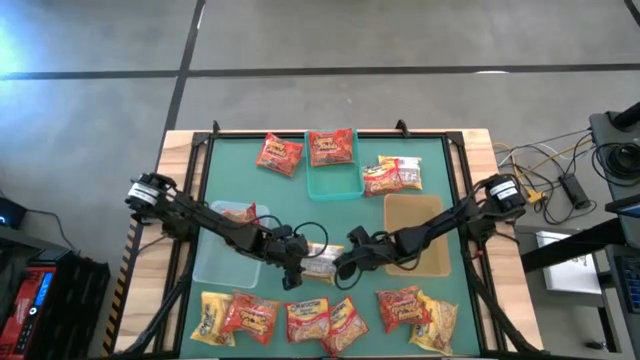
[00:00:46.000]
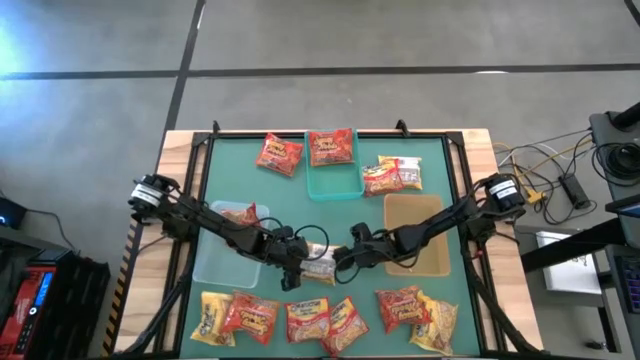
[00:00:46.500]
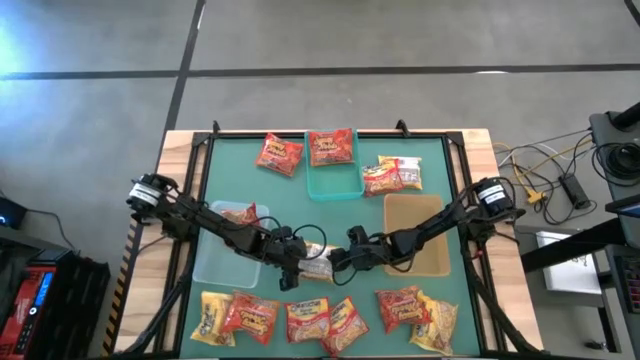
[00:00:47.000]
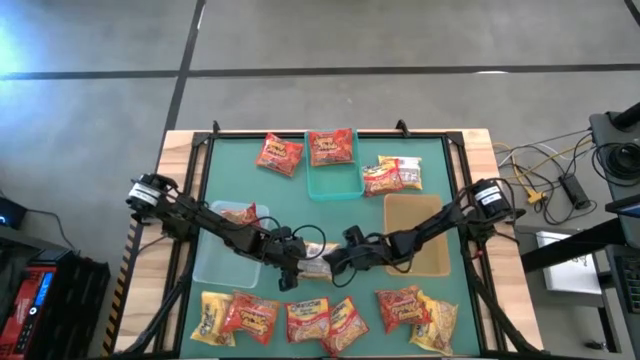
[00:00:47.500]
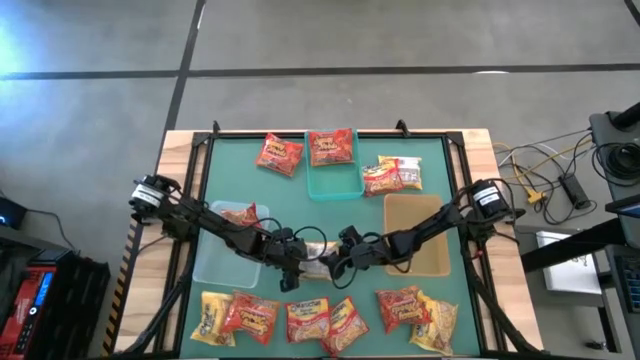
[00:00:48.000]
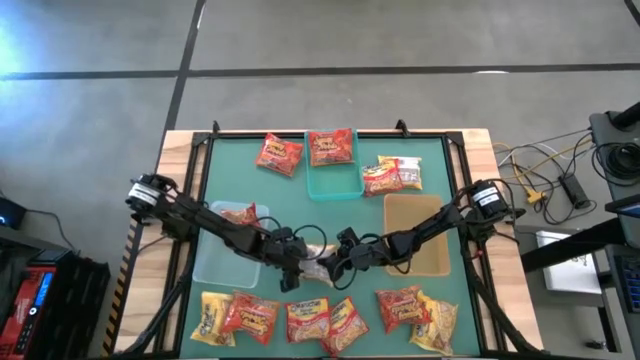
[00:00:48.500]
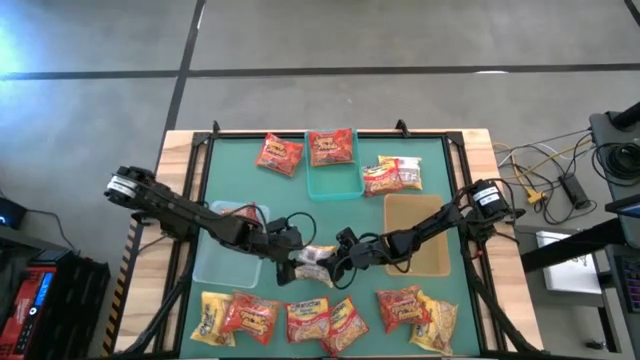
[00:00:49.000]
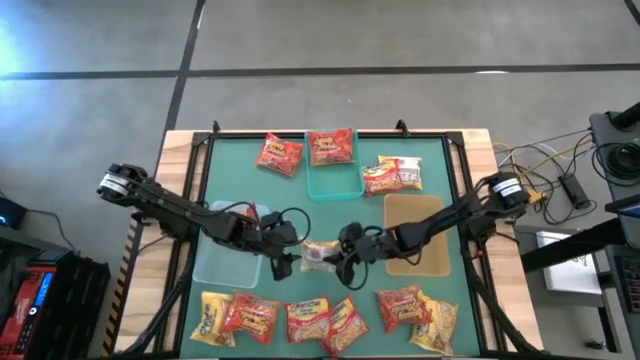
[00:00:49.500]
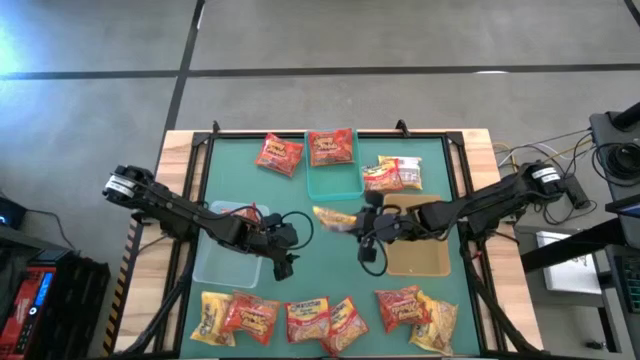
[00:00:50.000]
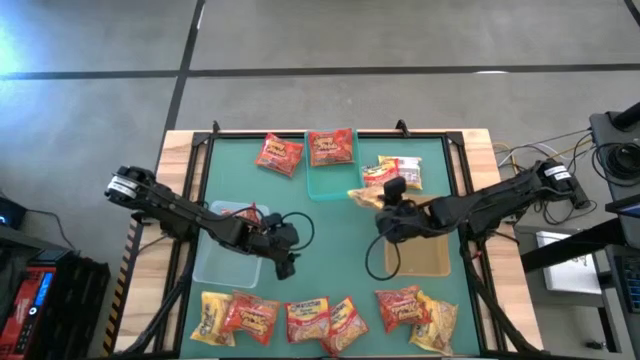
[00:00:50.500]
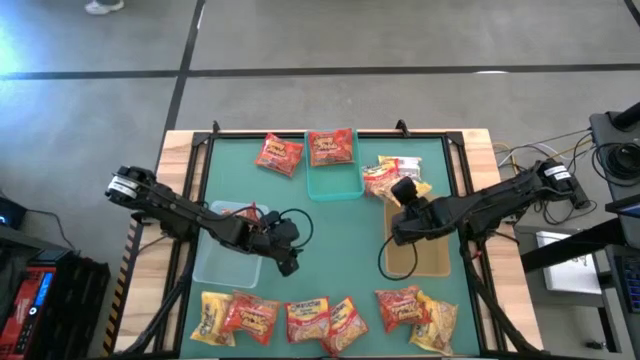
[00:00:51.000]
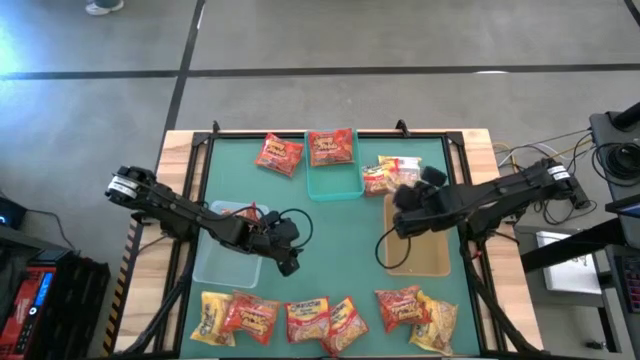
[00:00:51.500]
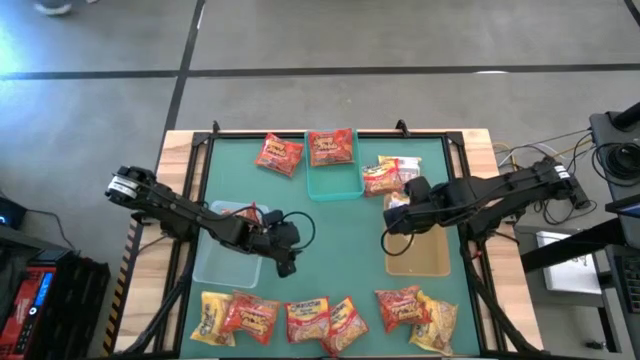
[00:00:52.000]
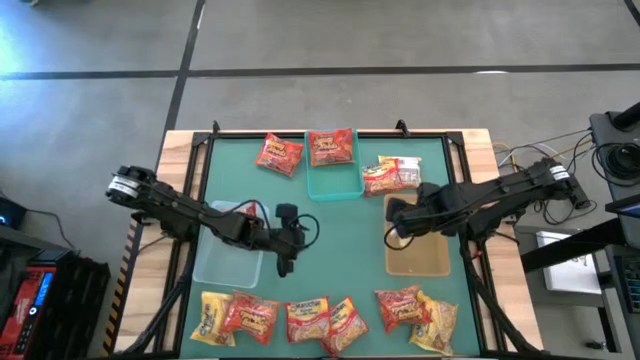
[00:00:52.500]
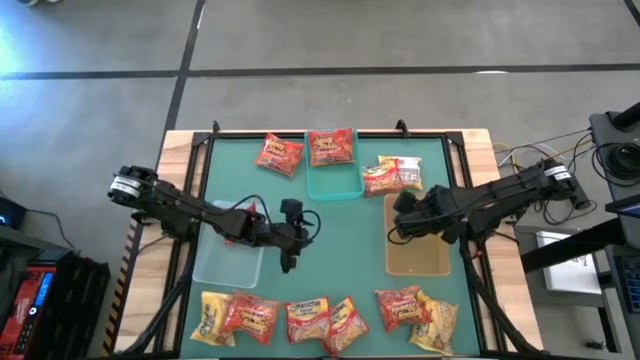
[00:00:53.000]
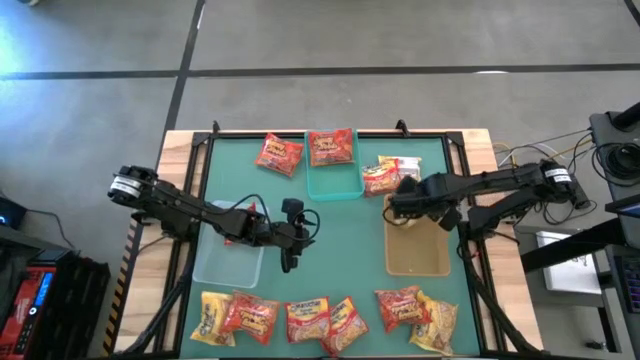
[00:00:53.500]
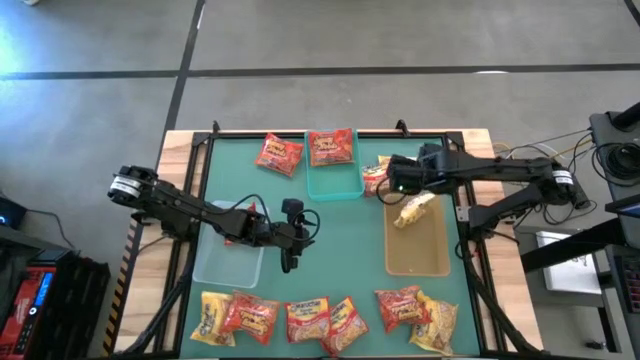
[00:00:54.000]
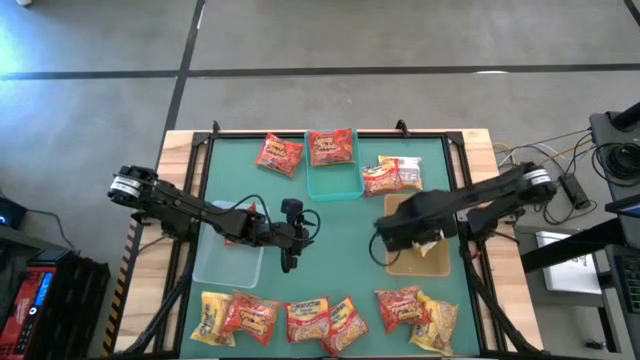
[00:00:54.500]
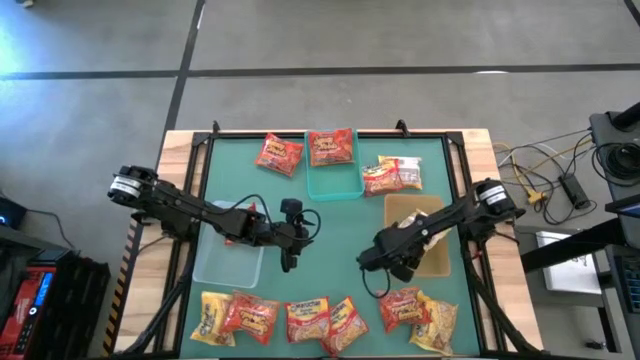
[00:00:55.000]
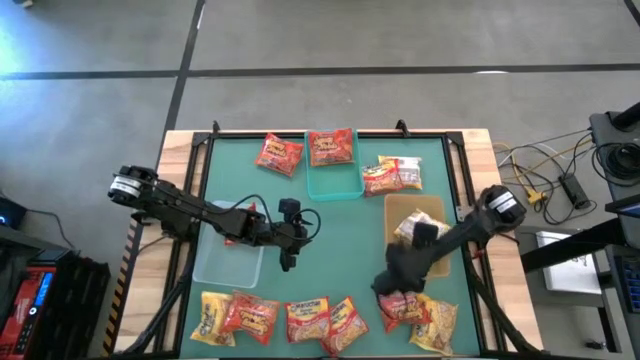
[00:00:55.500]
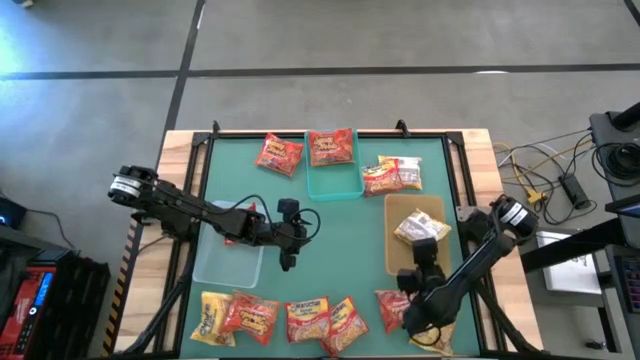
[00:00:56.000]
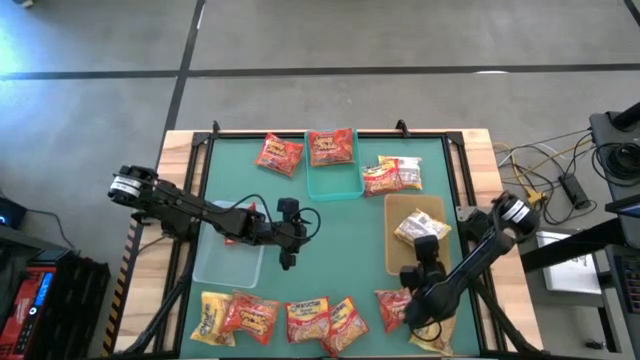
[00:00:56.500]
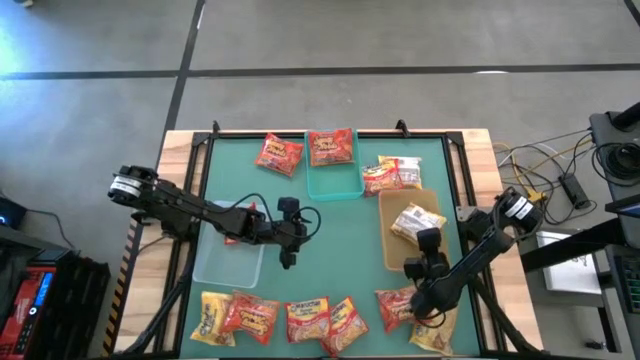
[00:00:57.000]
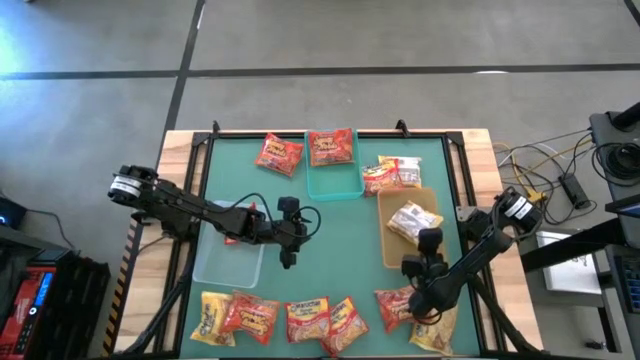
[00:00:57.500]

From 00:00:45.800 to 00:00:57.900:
Task: Sort Maruchan noodles
Put the yellow noodle pack into the yellow bin

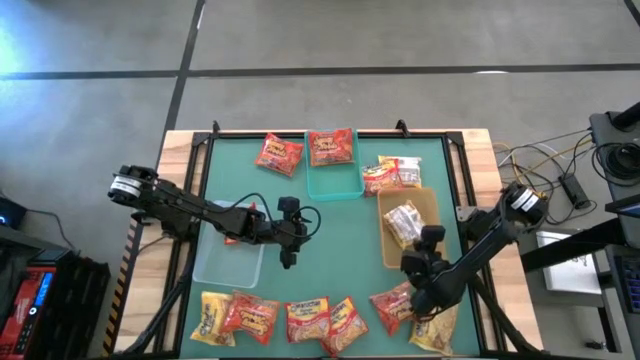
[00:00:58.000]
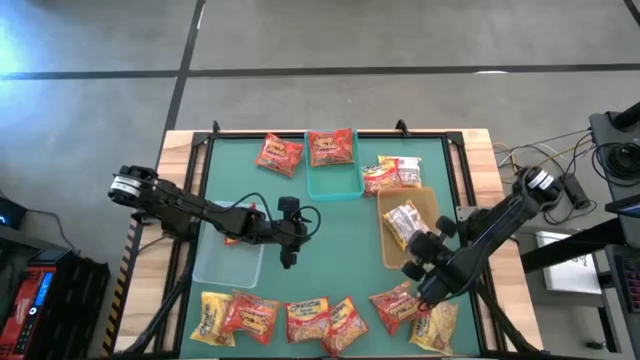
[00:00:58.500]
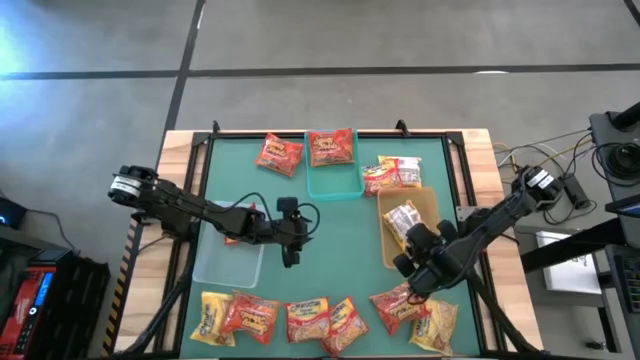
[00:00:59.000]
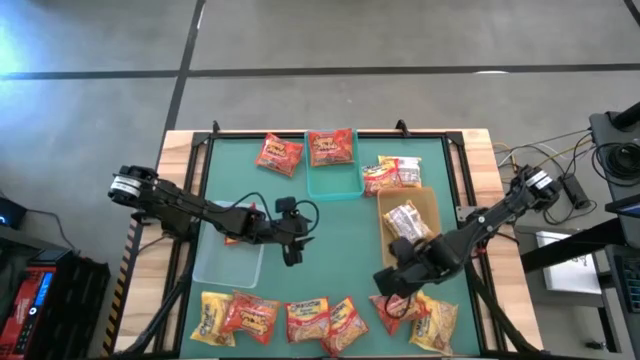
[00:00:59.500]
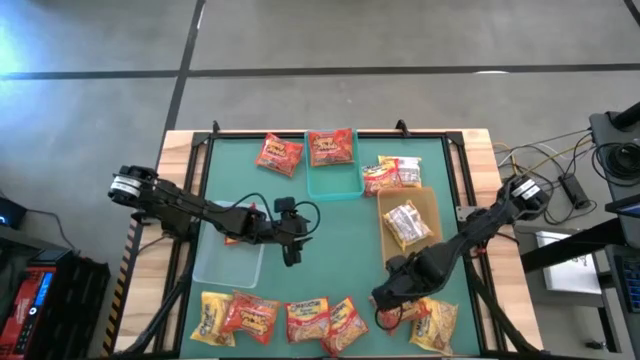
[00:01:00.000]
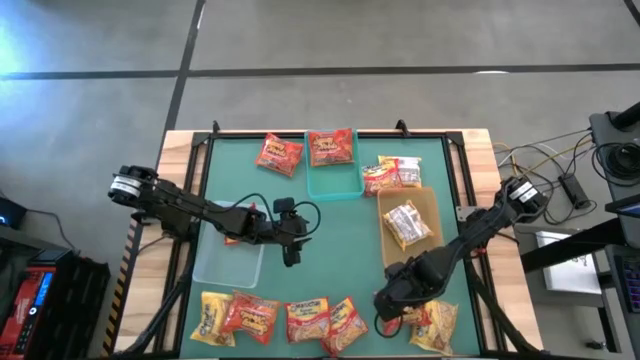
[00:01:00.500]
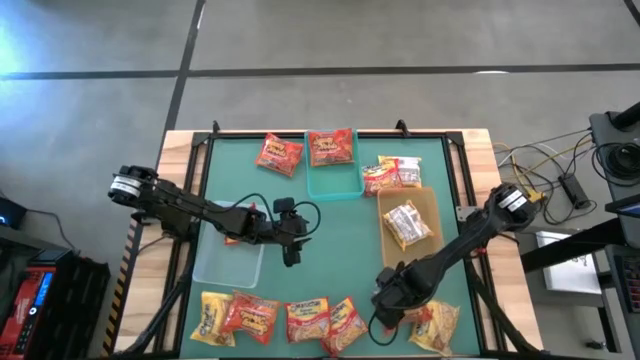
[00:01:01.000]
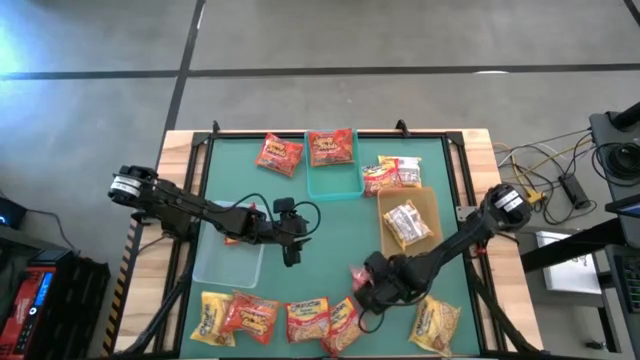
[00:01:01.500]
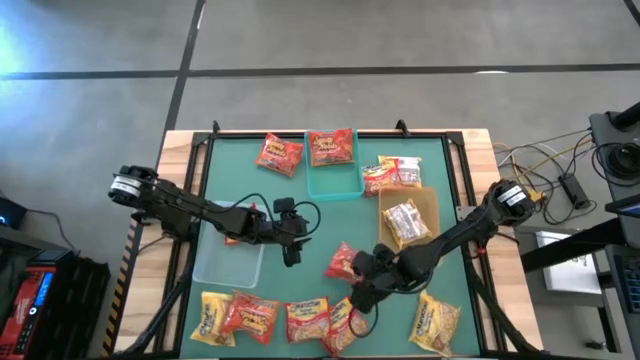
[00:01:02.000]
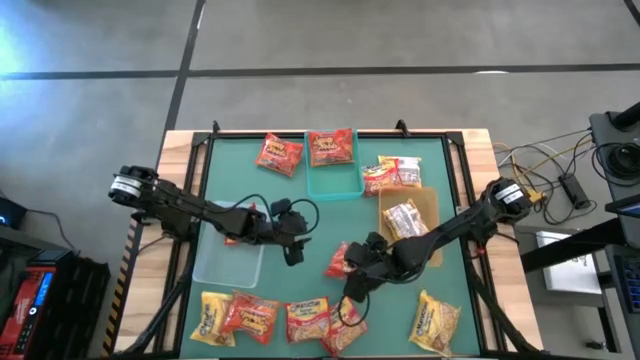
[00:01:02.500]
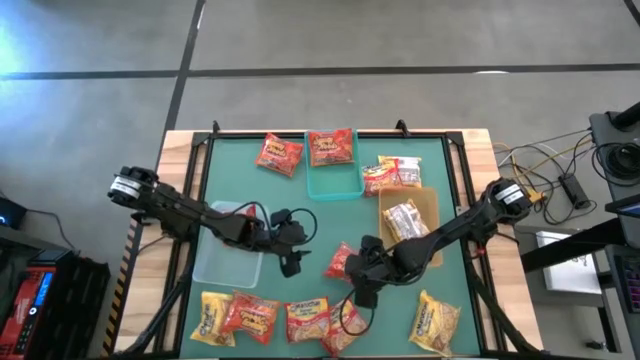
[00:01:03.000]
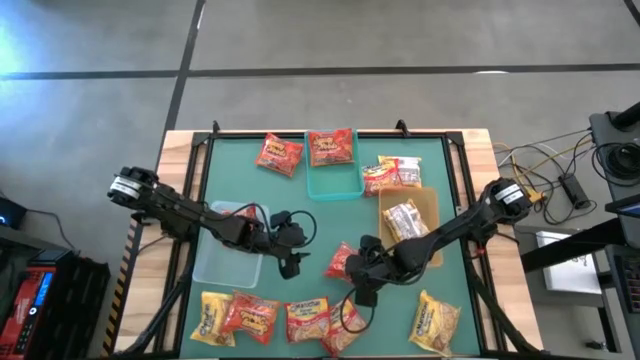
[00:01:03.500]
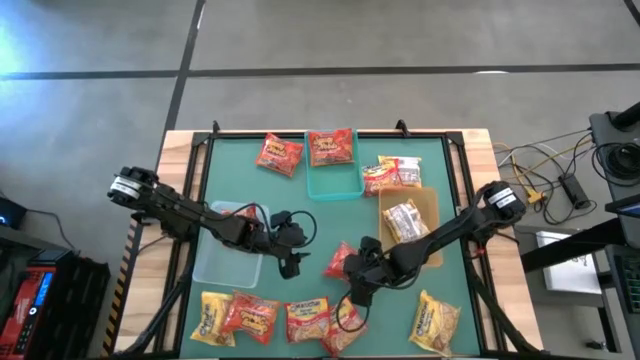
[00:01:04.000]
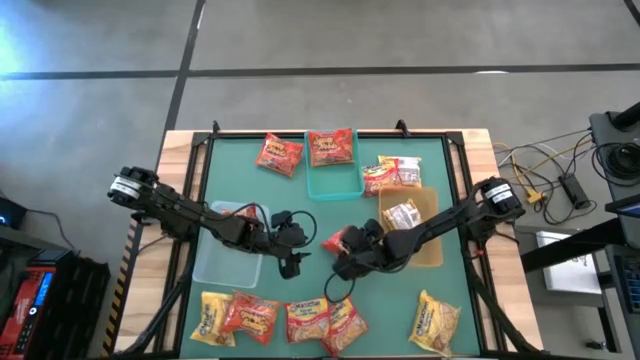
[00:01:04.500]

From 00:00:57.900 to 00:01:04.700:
Move the orange noodle pack to the center of the table

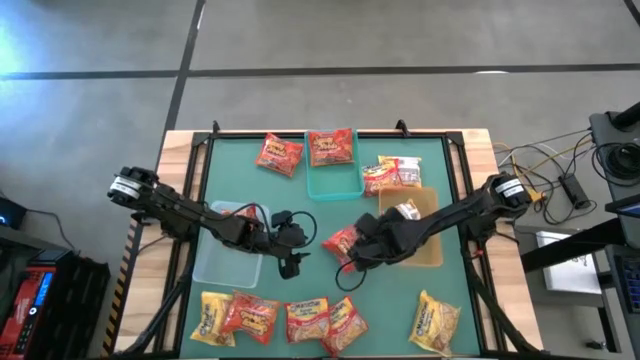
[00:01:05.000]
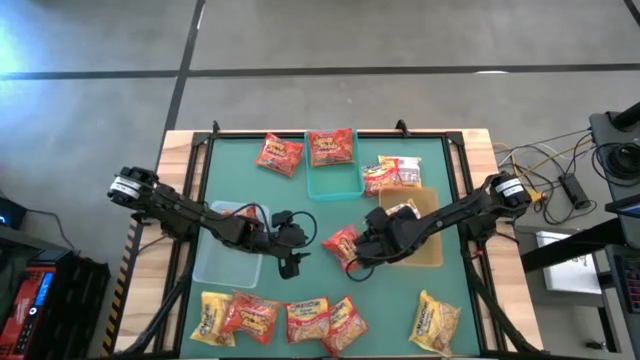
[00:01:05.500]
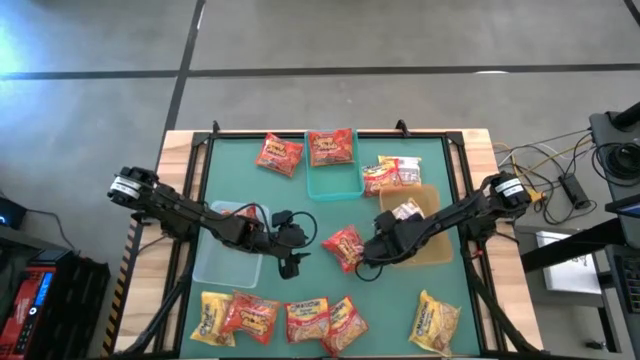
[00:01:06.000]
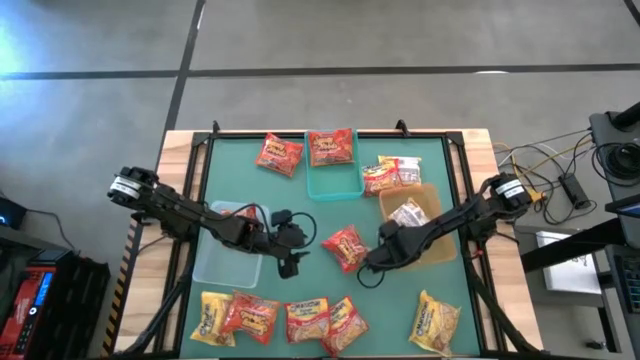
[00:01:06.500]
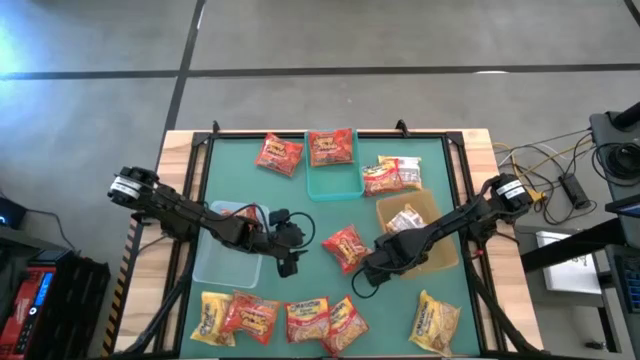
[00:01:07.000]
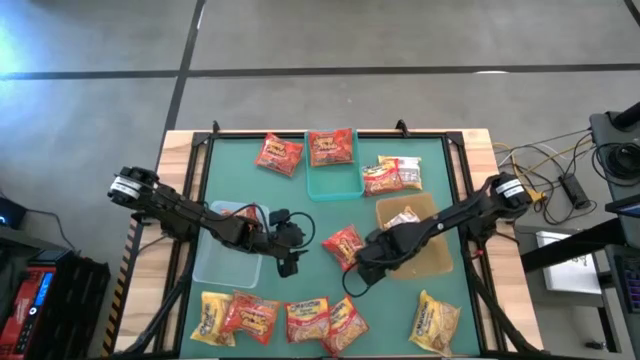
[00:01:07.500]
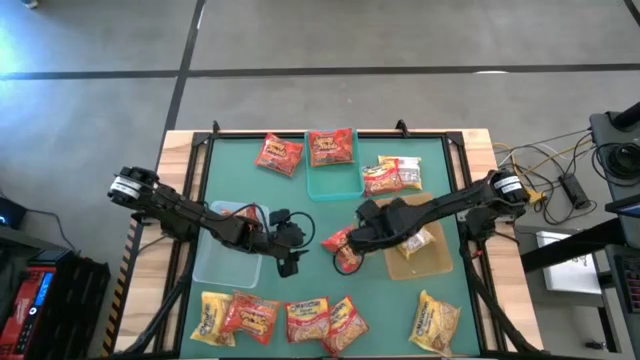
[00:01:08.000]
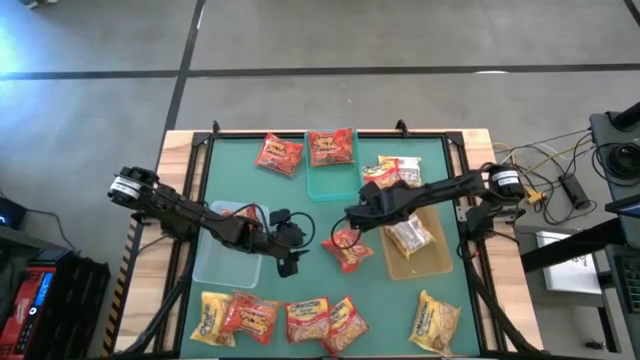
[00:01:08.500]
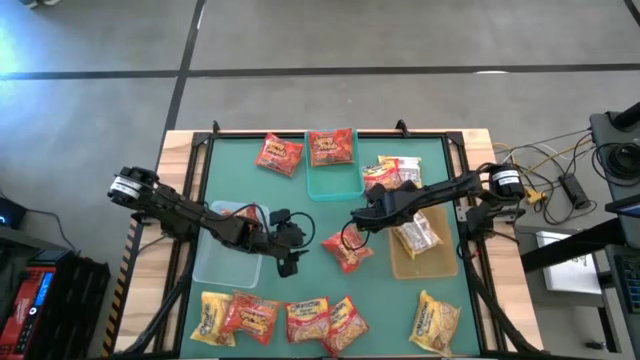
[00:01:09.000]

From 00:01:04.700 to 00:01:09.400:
Adjust the yellow bin
